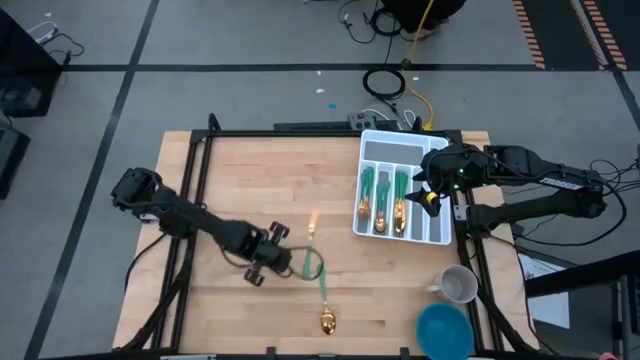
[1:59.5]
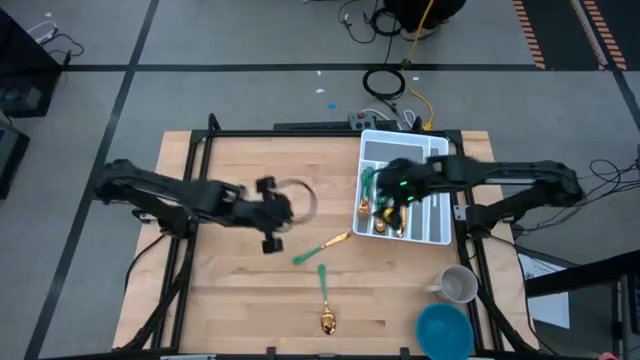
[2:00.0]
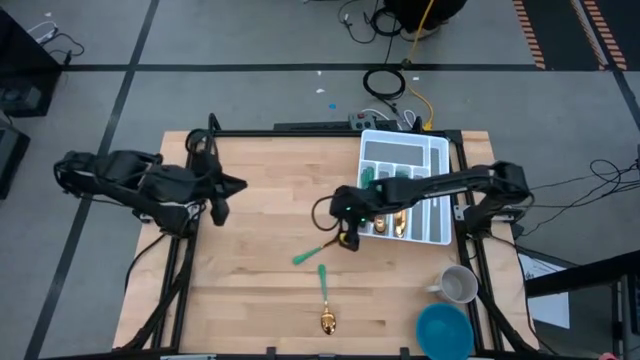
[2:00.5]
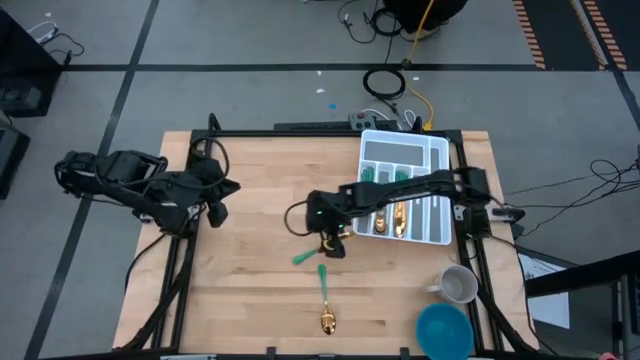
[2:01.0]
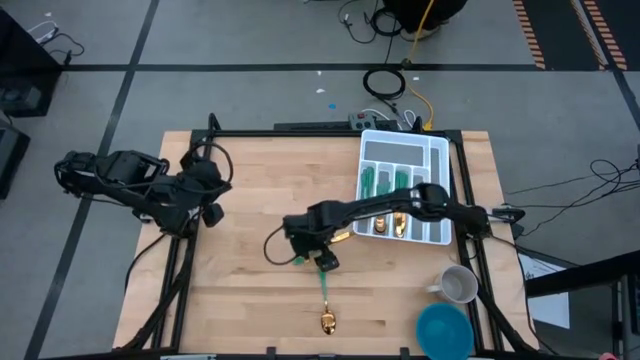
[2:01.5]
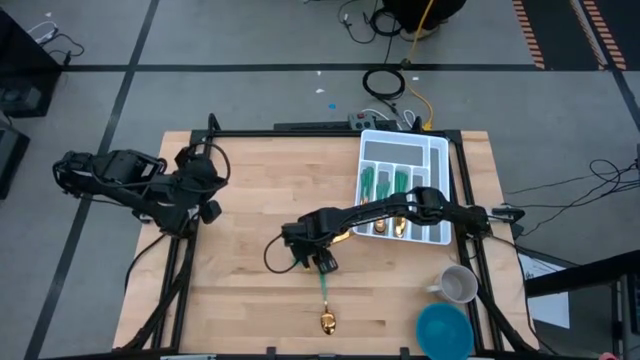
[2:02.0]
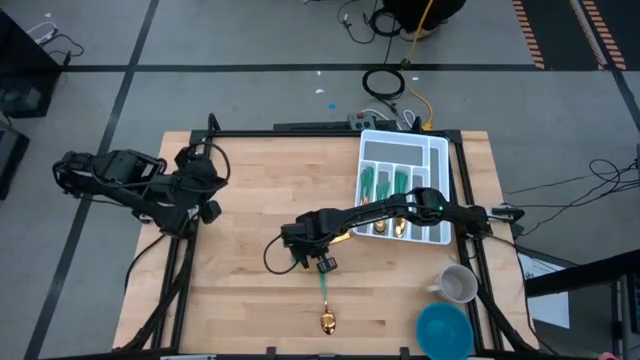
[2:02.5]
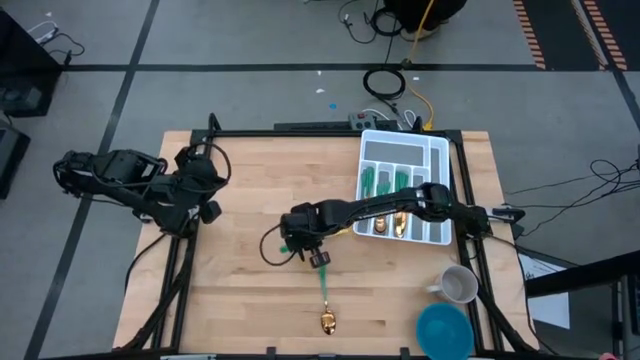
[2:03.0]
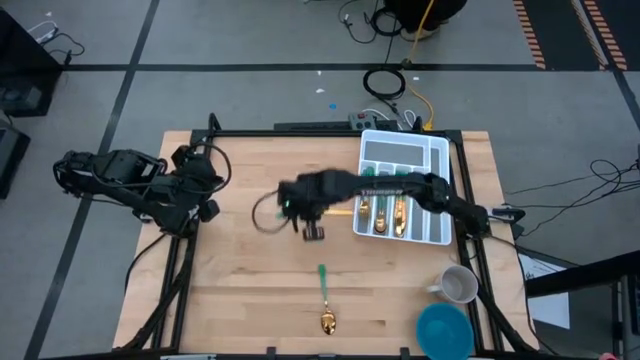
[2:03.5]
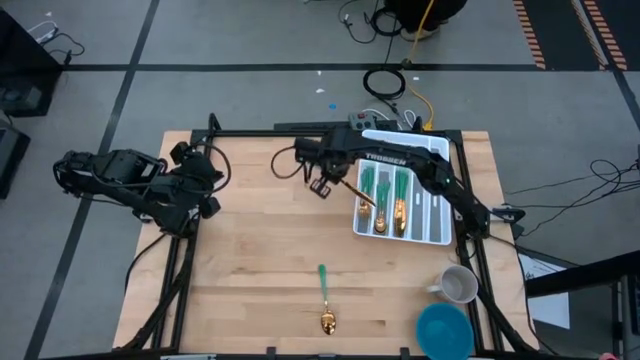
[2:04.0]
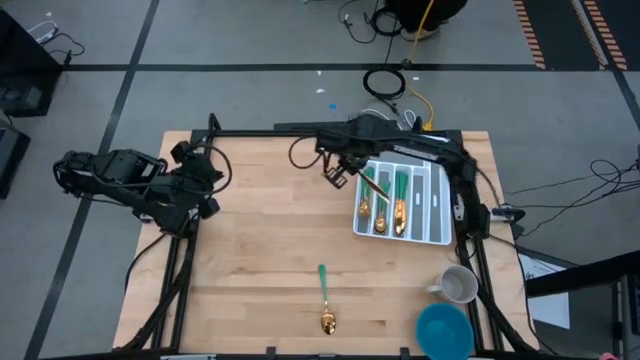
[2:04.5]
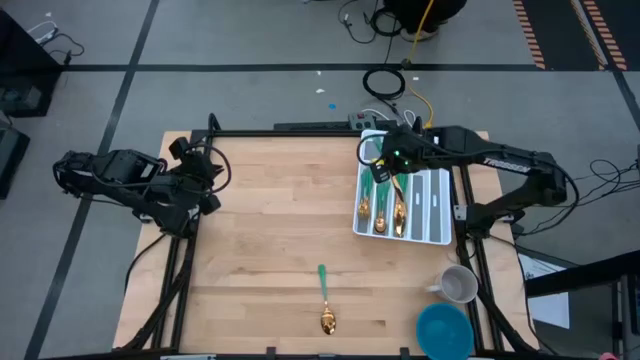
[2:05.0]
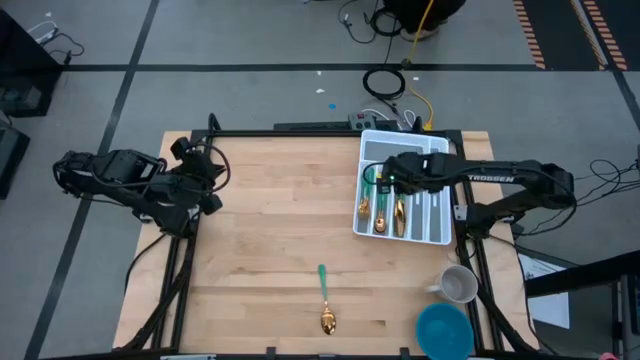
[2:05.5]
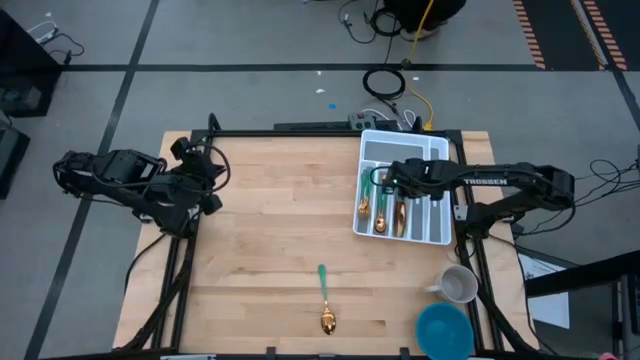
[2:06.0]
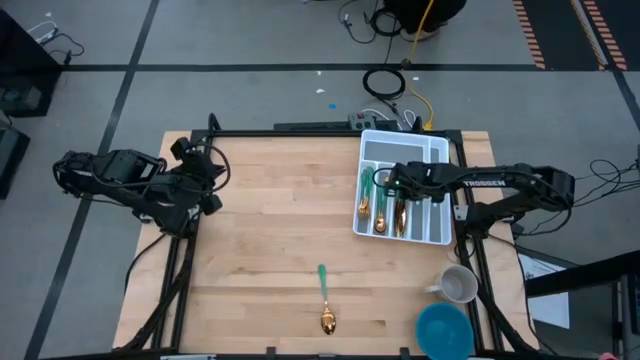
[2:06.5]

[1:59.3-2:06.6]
Task: Sort silverware
Put the knife into the silverware tray

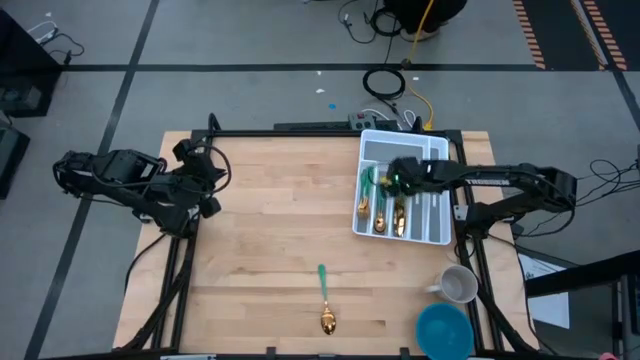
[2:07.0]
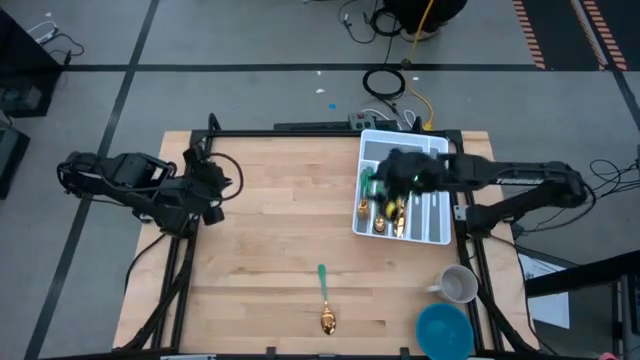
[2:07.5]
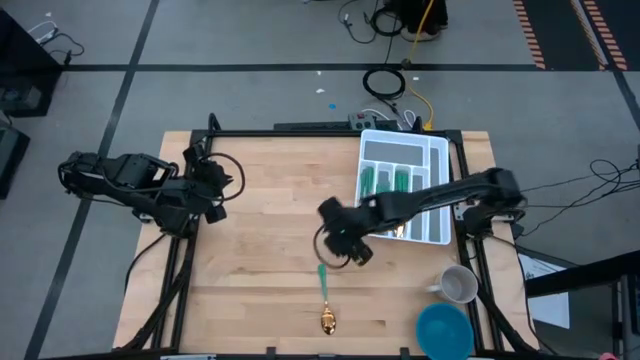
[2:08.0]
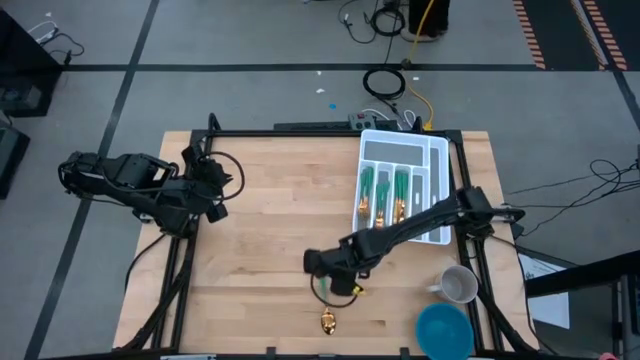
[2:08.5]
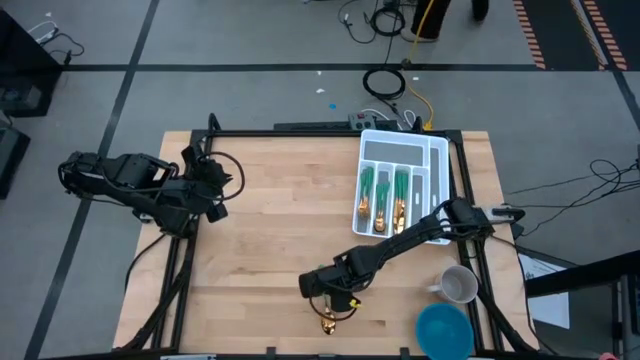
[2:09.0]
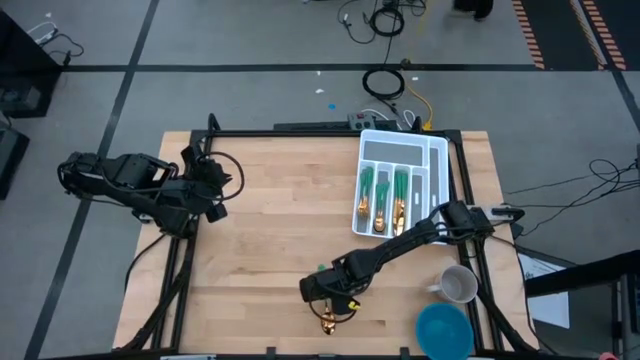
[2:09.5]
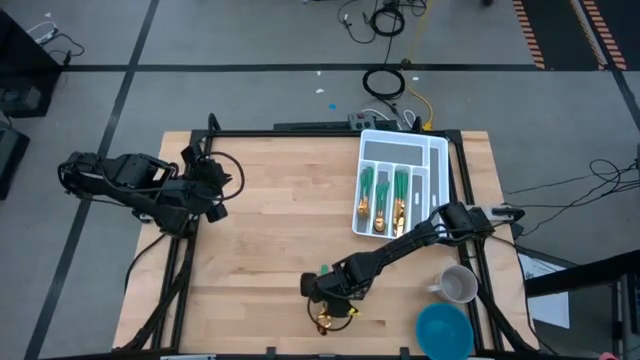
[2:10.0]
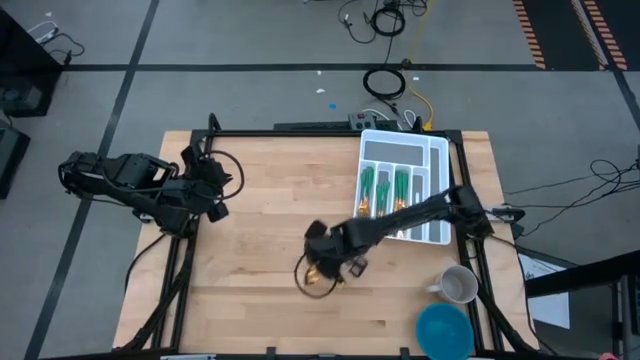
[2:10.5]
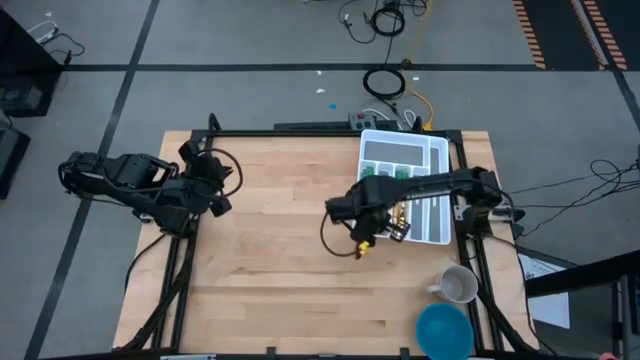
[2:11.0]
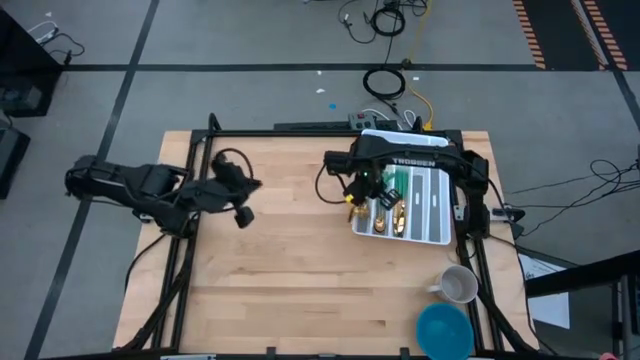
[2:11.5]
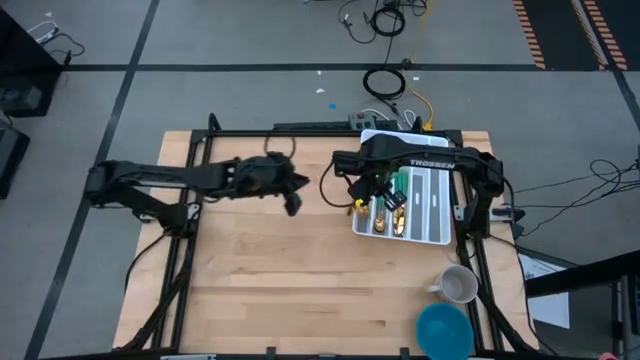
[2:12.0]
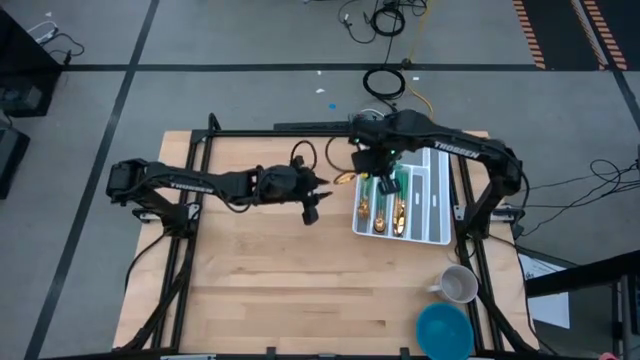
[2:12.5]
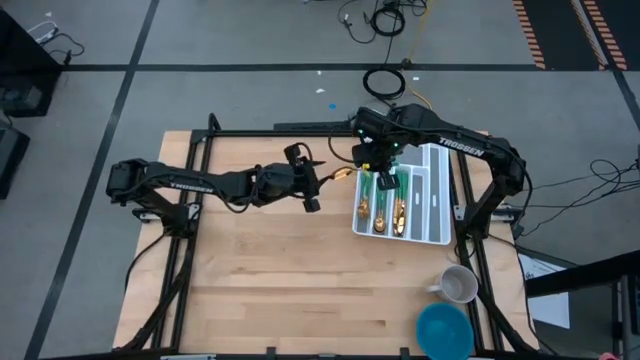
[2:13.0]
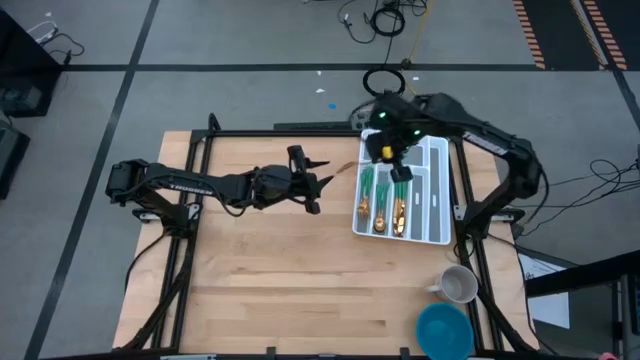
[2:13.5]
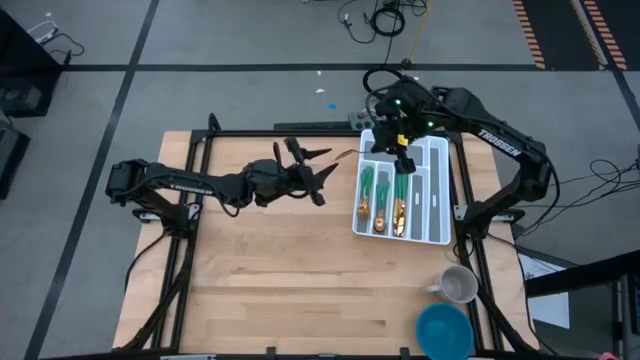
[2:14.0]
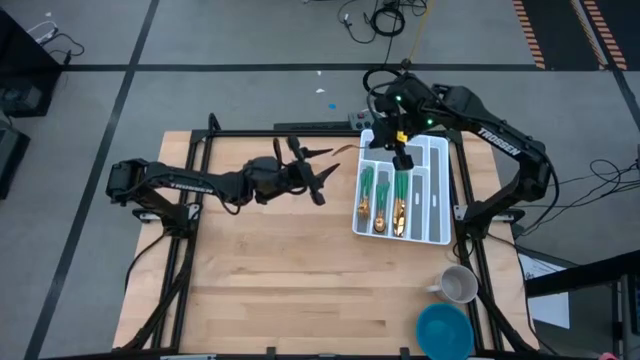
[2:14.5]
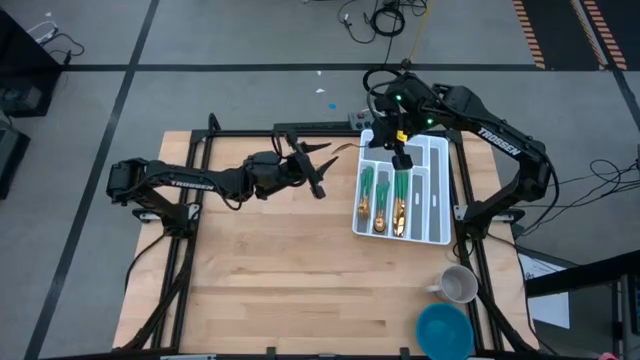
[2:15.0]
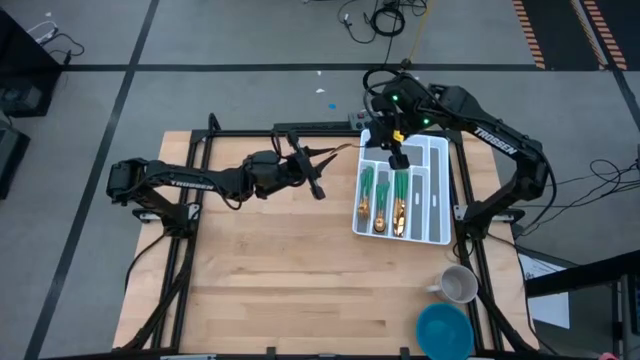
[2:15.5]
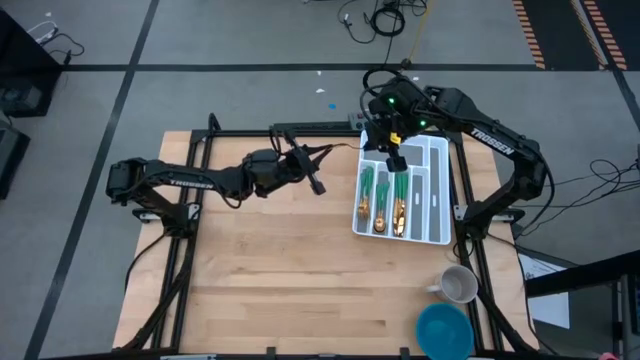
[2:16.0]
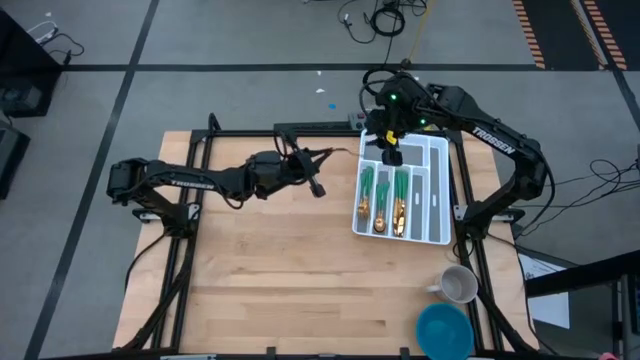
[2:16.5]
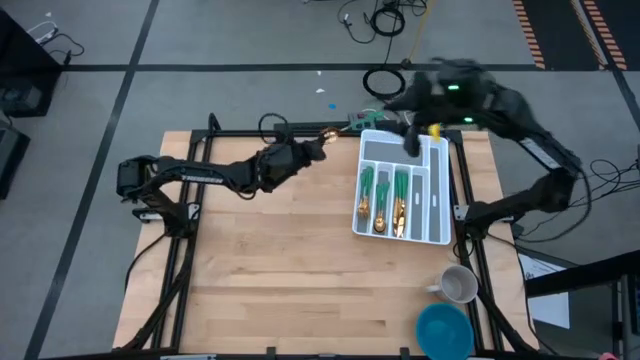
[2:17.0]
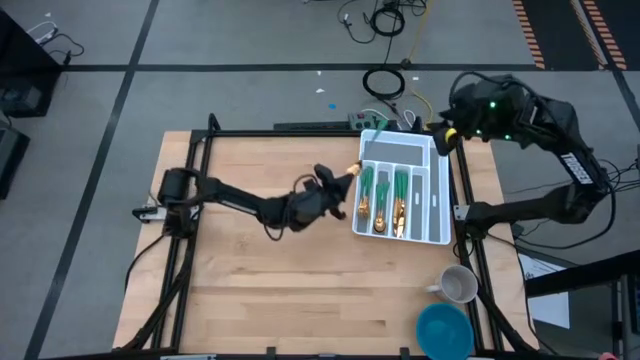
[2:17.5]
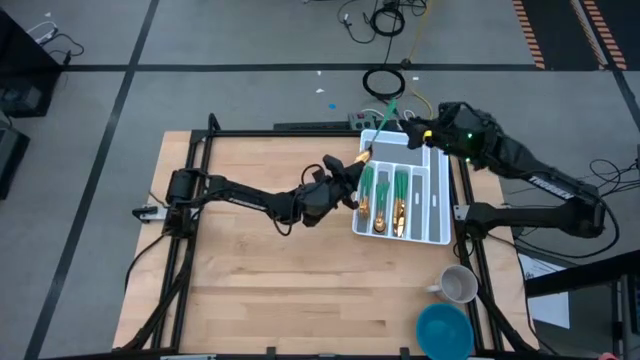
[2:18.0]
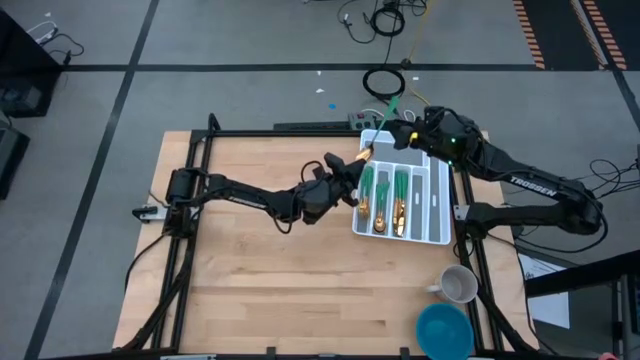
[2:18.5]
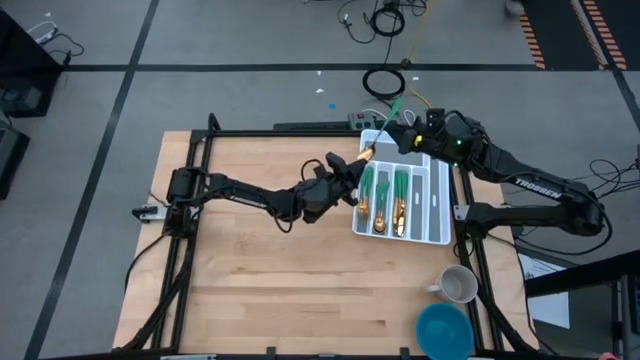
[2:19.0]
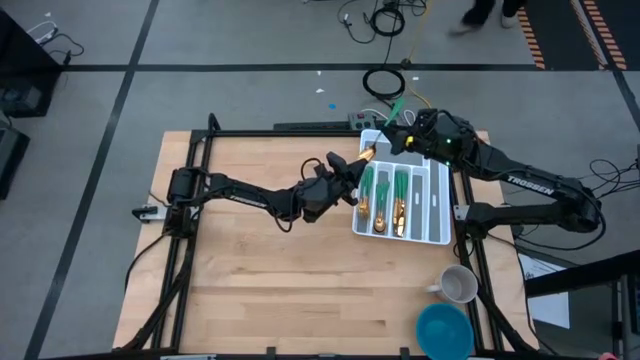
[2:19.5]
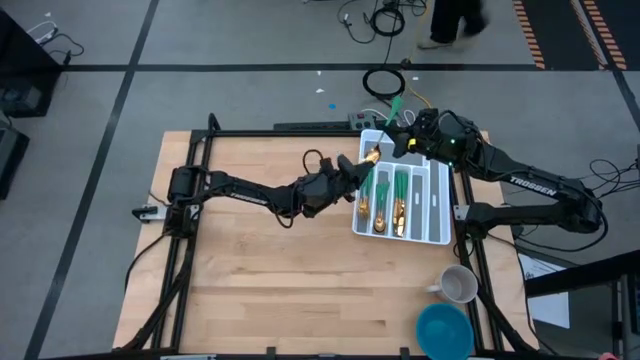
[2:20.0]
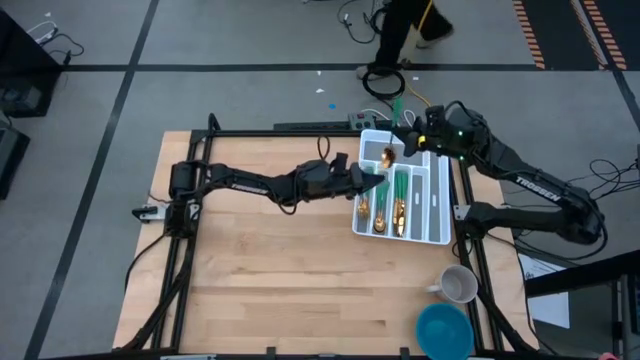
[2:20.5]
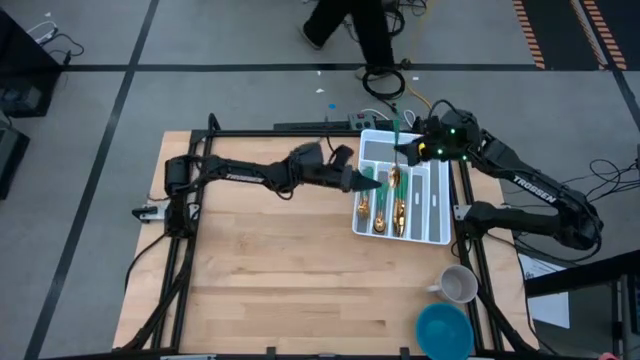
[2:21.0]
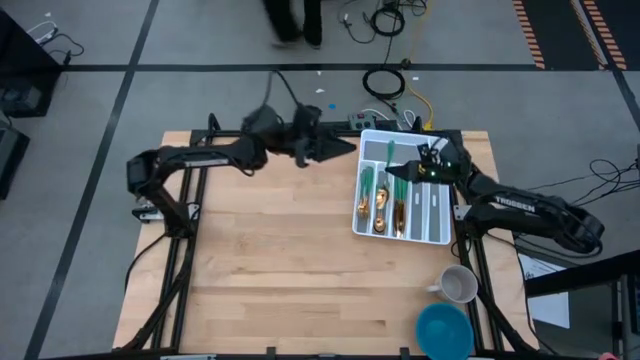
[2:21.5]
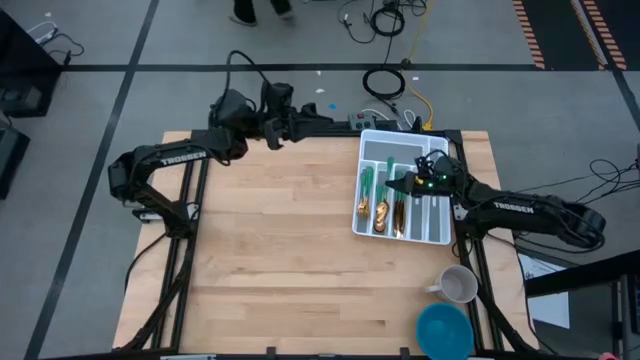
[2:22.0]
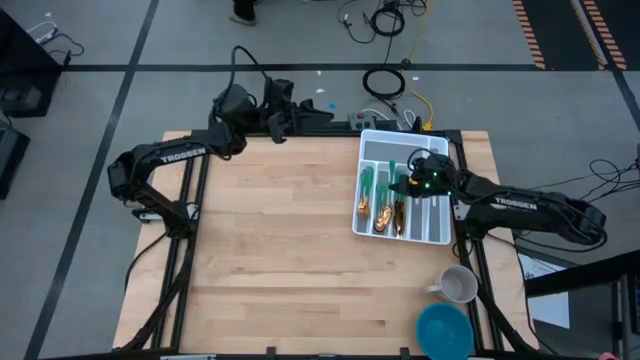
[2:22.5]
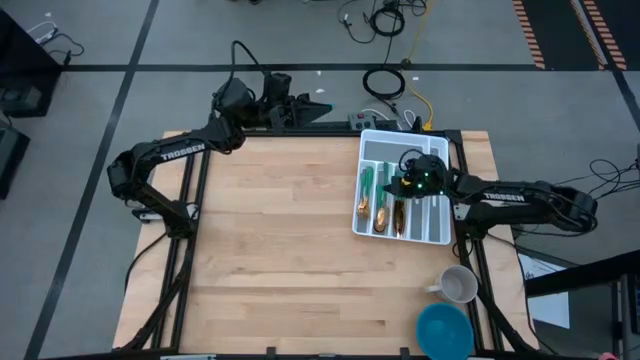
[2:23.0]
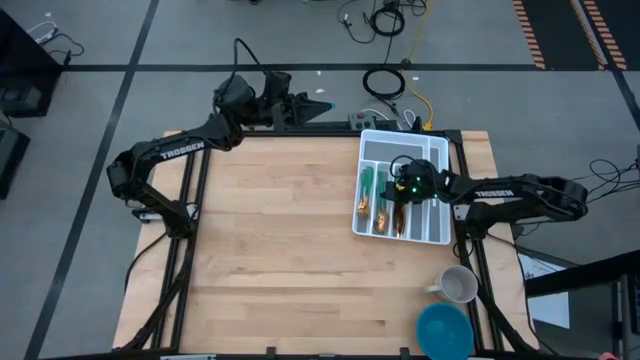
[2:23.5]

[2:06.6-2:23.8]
Put the spoon into the silverware tray
